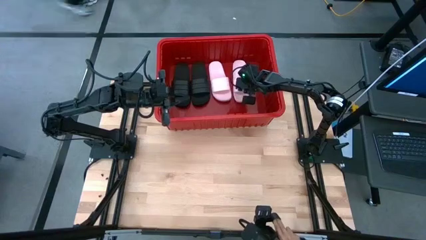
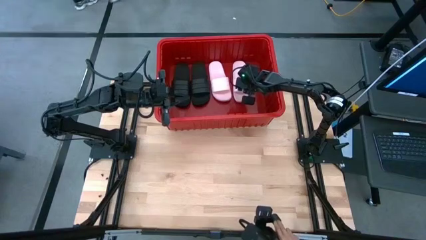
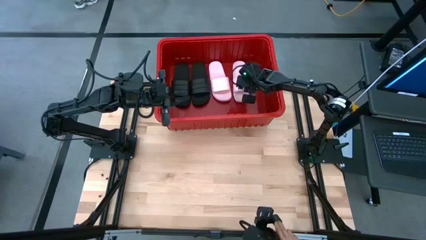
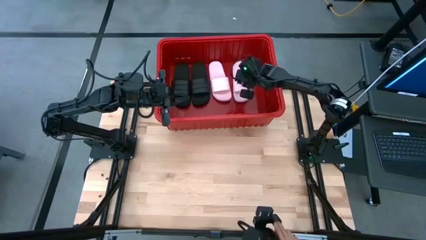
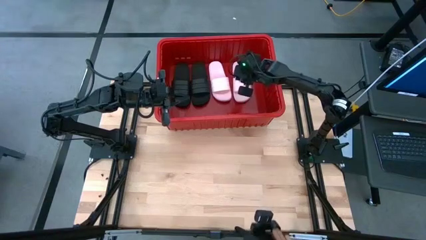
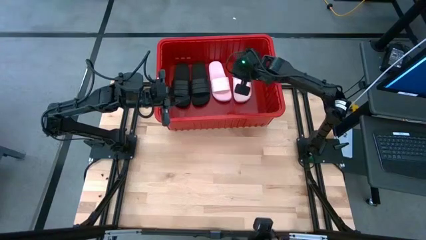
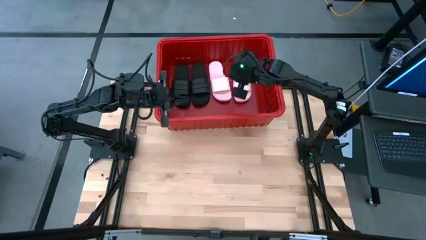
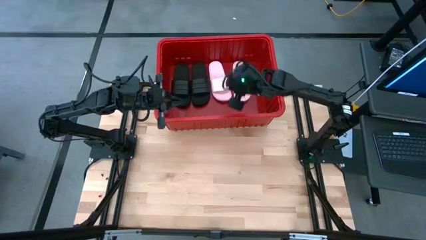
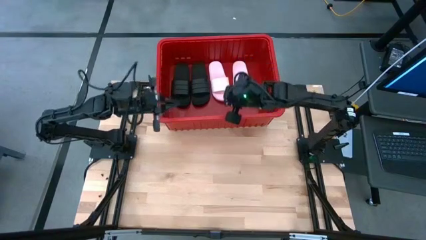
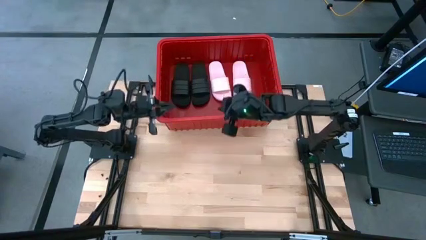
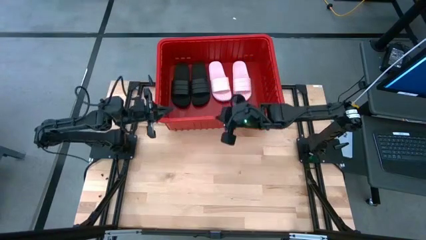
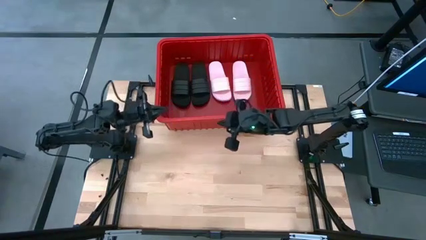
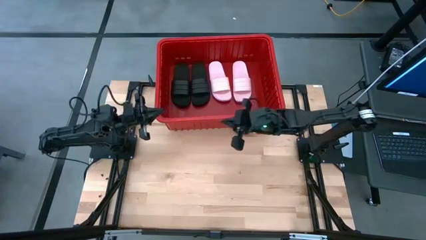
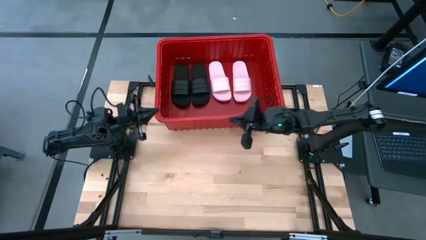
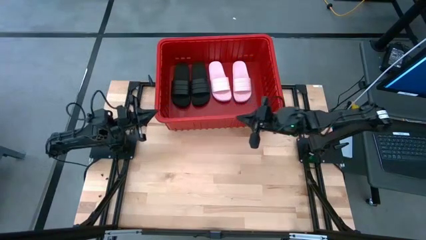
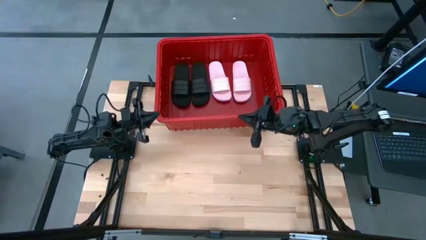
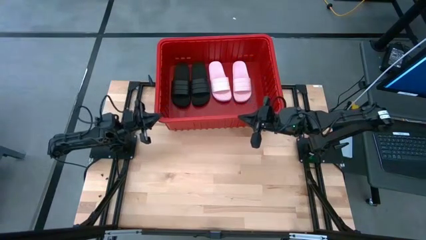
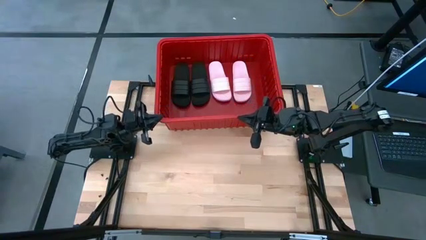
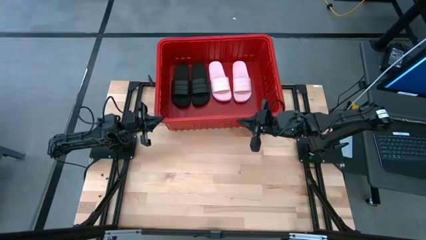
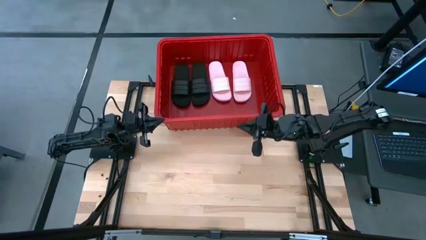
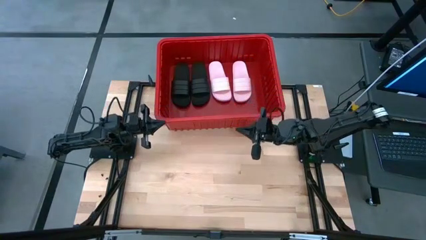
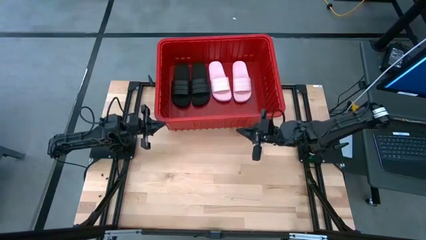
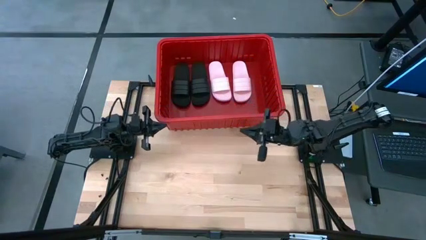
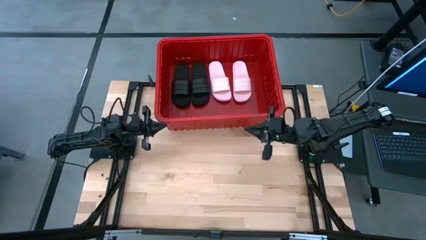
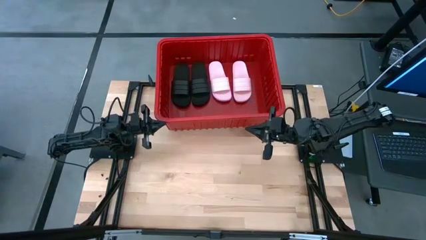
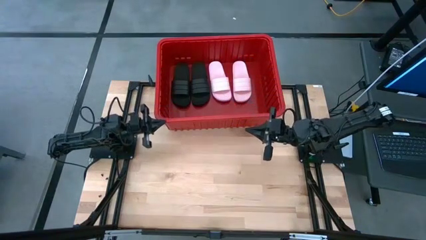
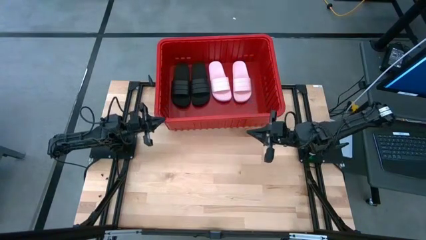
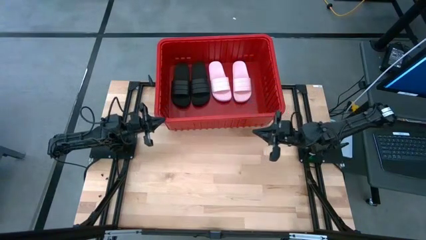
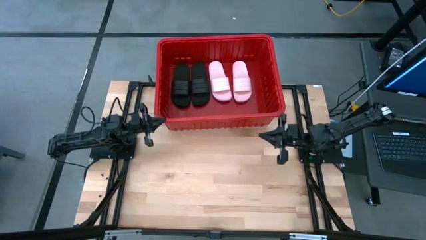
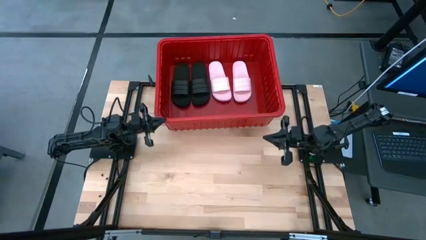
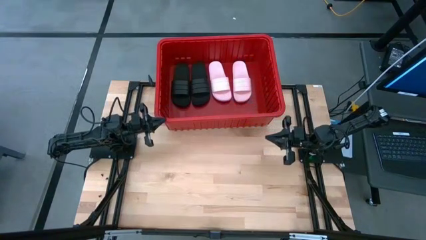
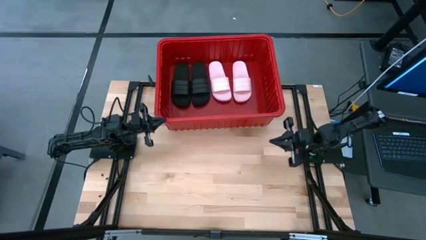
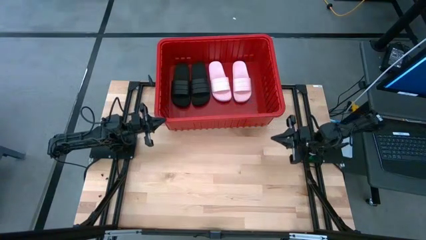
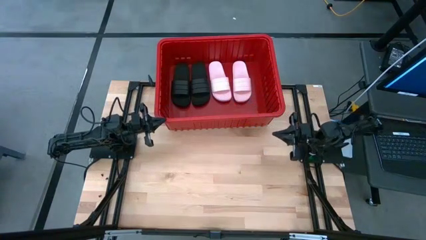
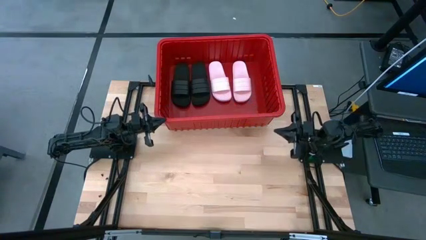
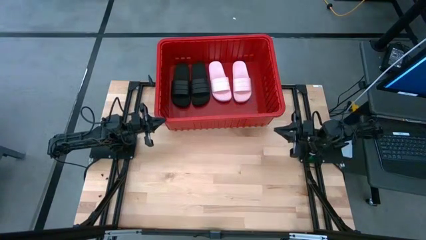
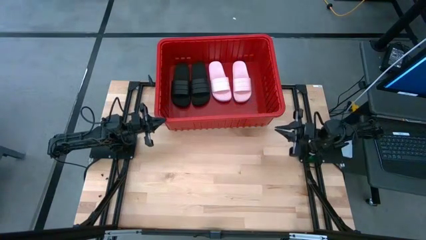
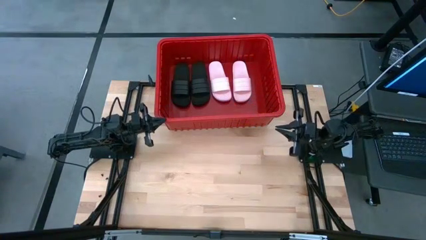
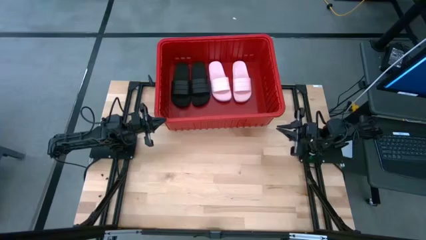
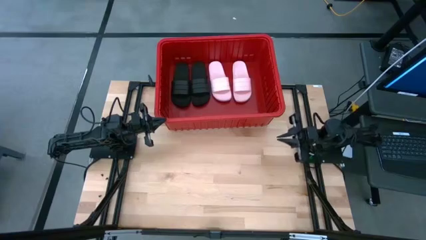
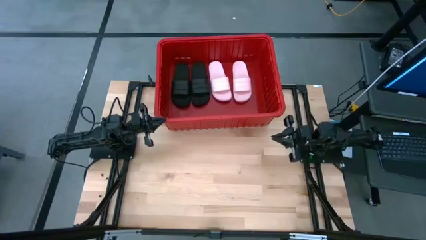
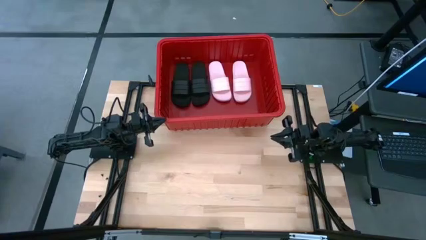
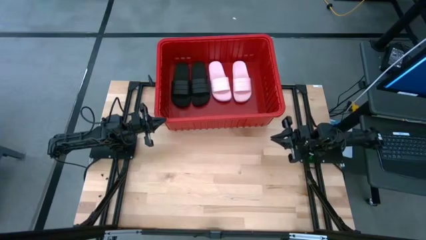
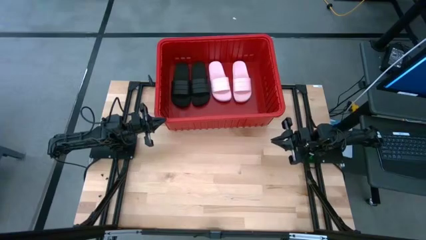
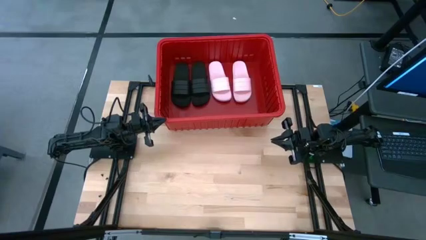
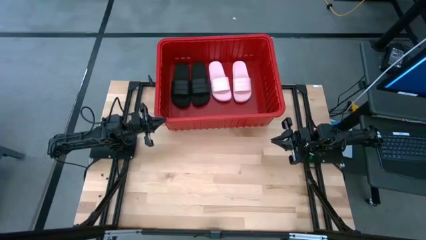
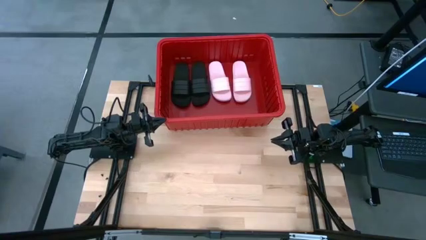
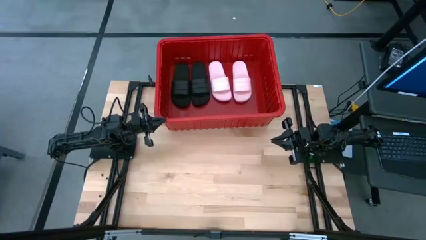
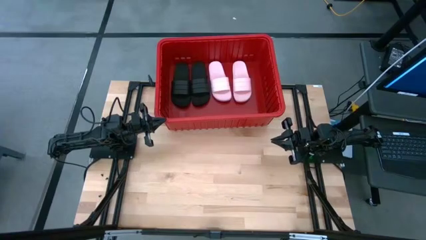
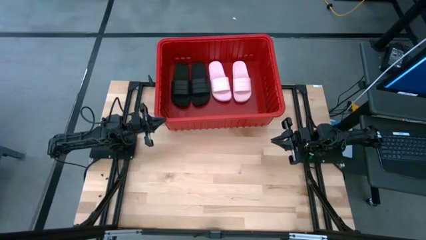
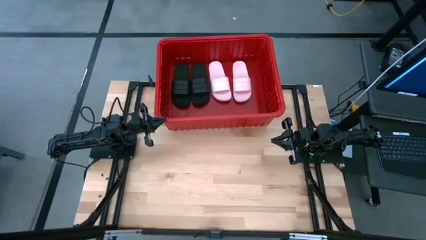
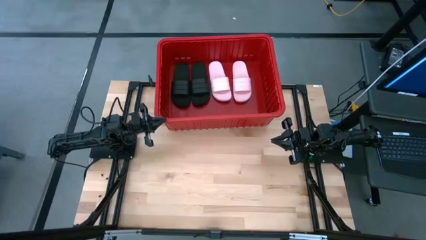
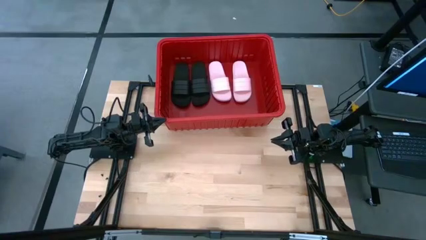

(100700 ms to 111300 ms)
Task: Pick and place slides into bin
Return to Home Position

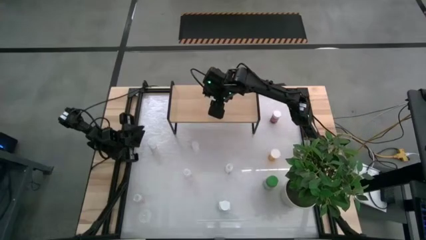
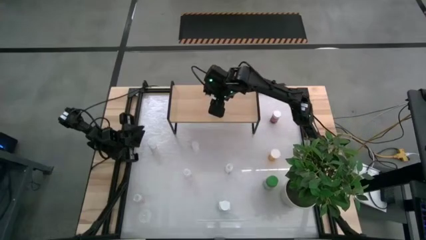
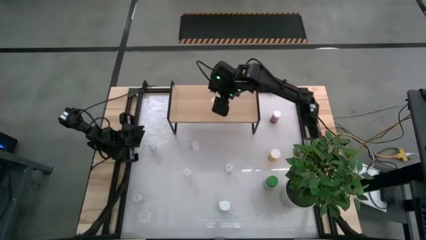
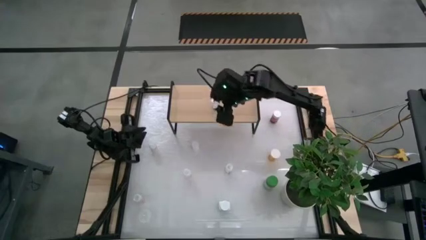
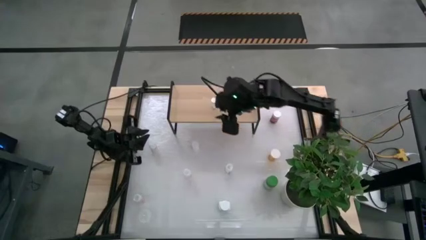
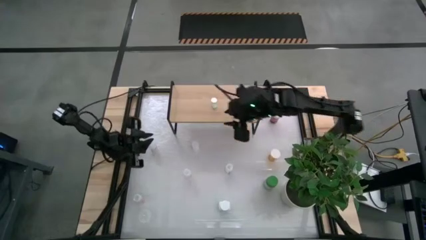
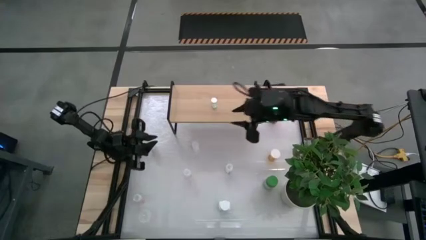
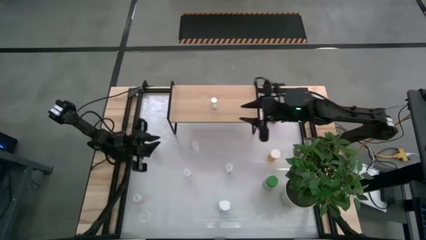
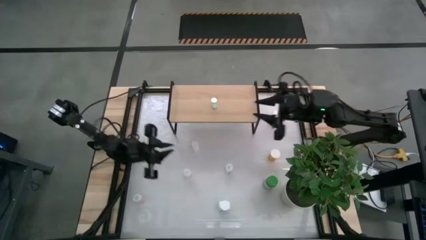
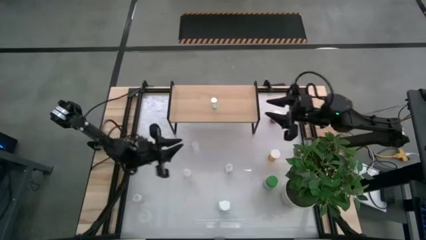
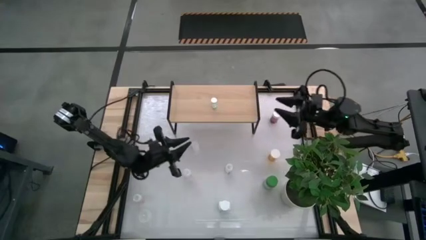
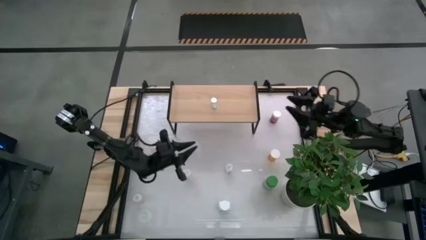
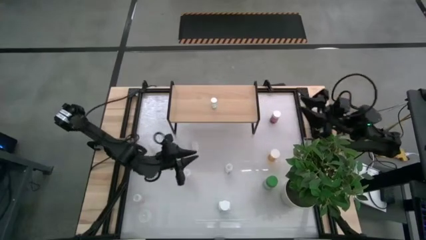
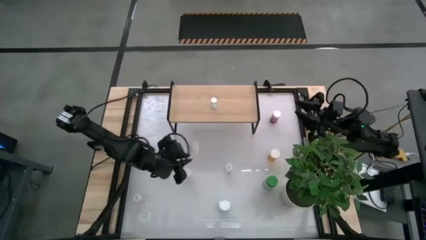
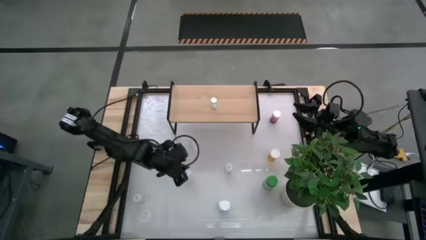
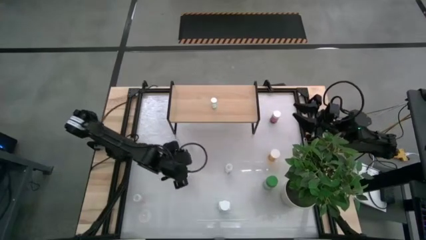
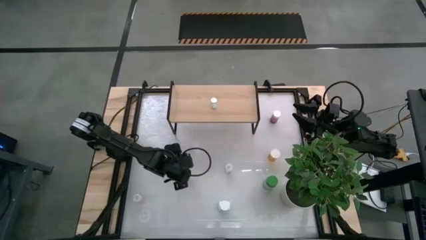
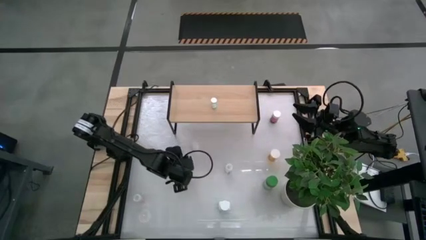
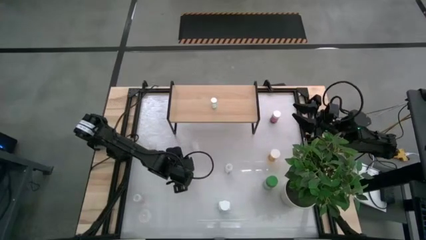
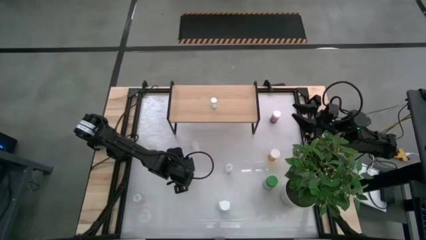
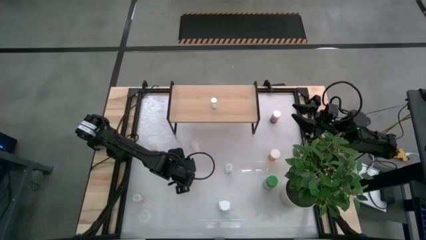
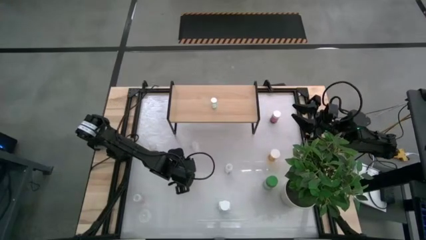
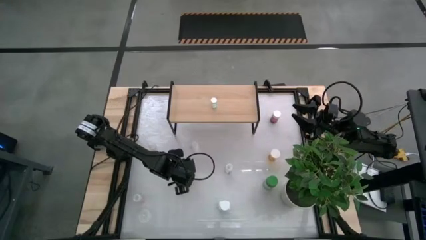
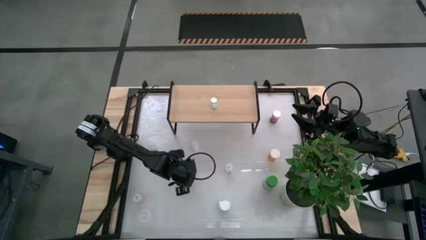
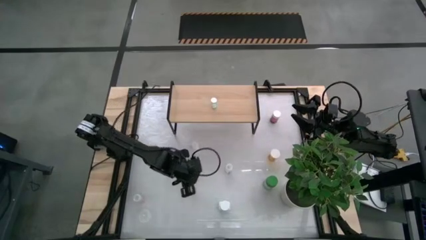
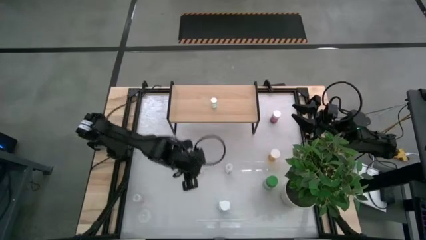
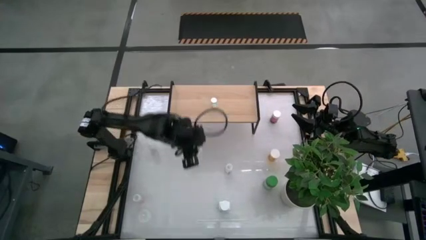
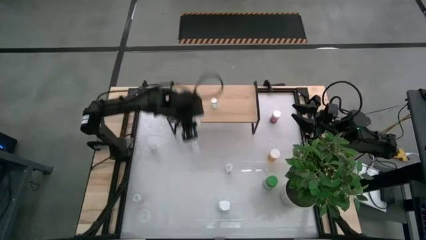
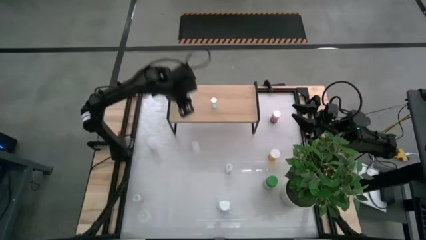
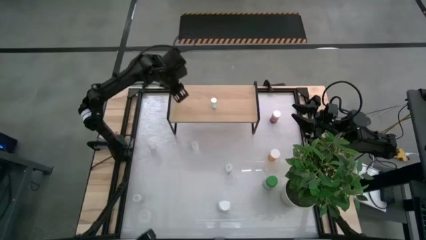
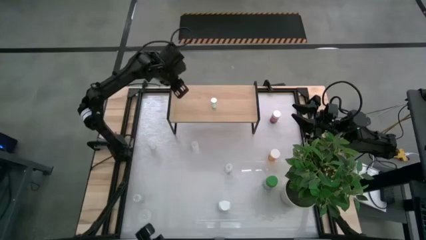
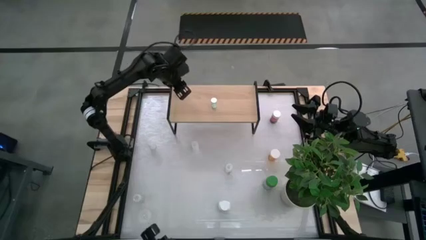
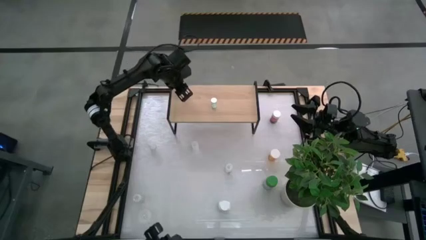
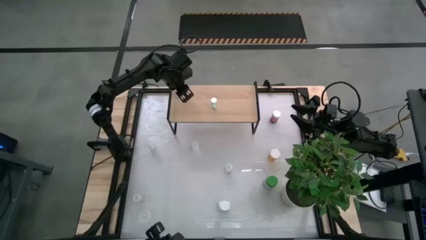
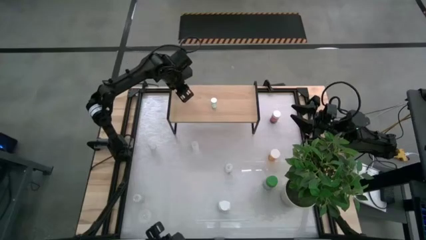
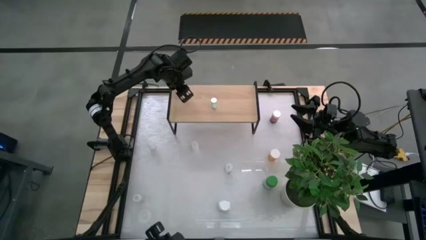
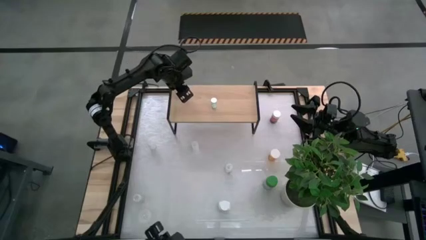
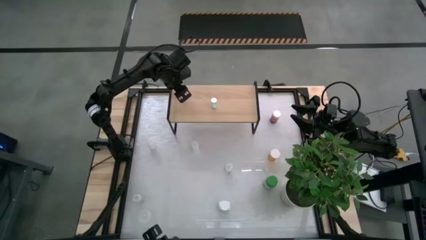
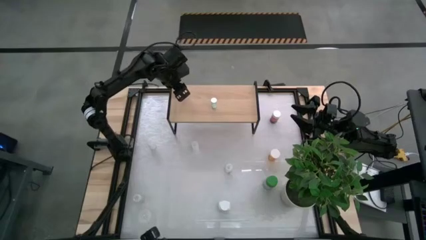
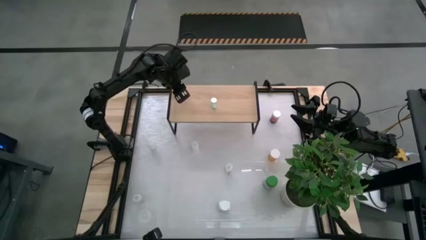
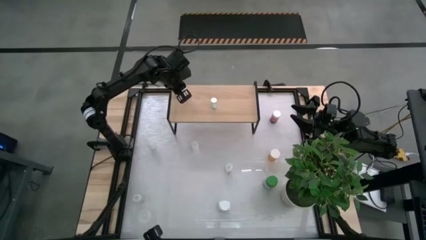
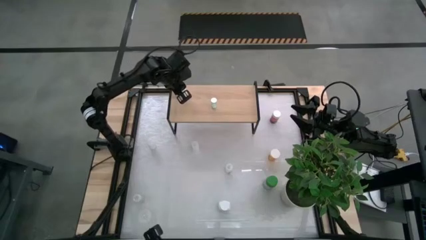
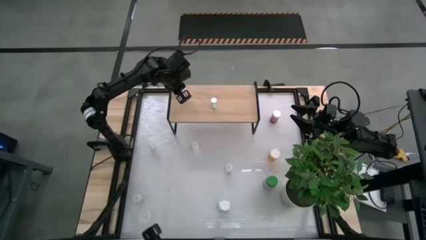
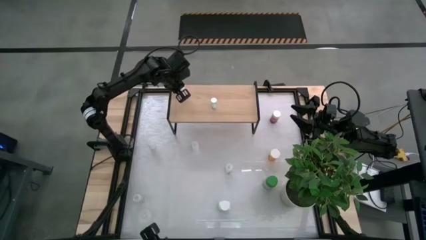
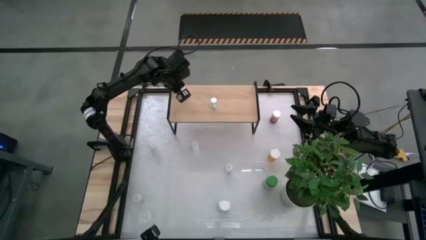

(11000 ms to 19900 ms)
Task: Pick and place medicine bottles onto shelf by color
Put the white pill bottle on the shelf
